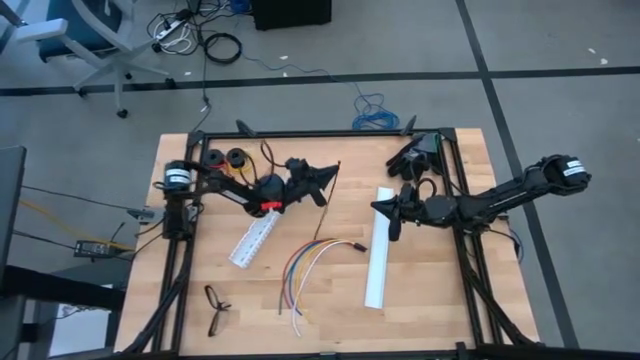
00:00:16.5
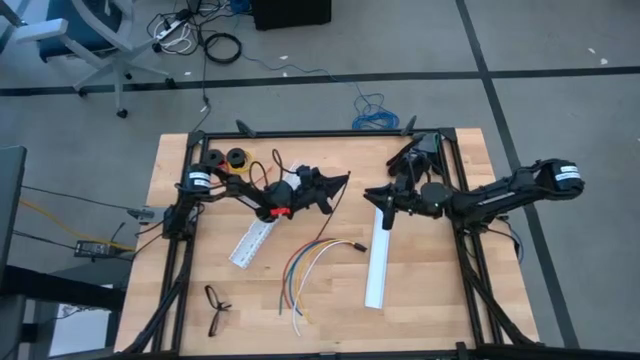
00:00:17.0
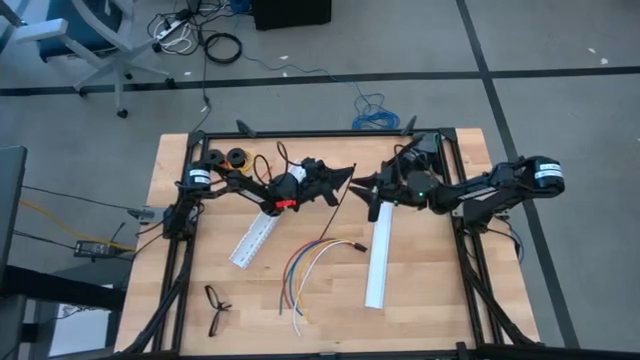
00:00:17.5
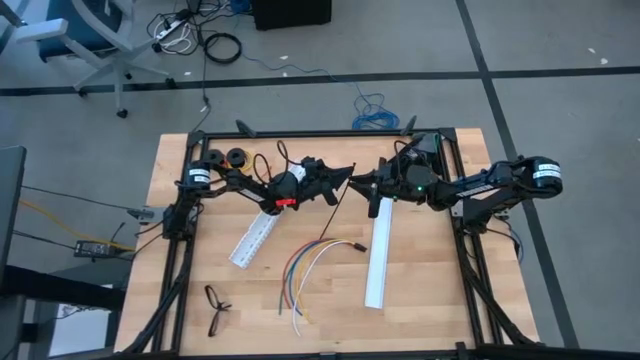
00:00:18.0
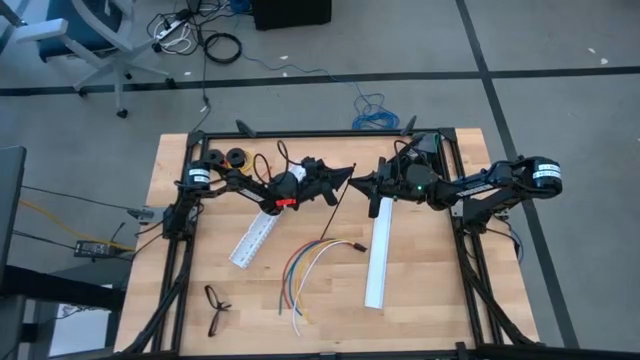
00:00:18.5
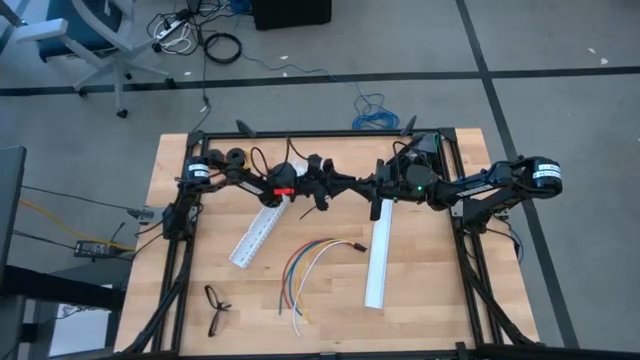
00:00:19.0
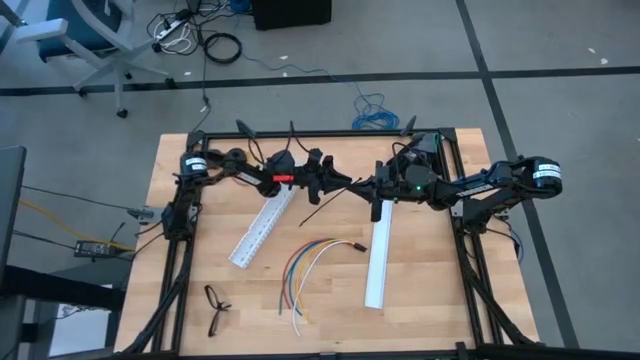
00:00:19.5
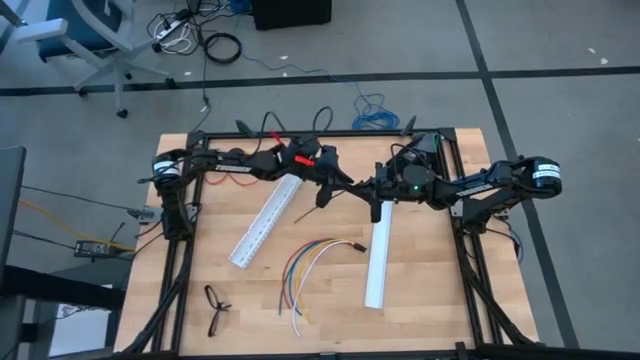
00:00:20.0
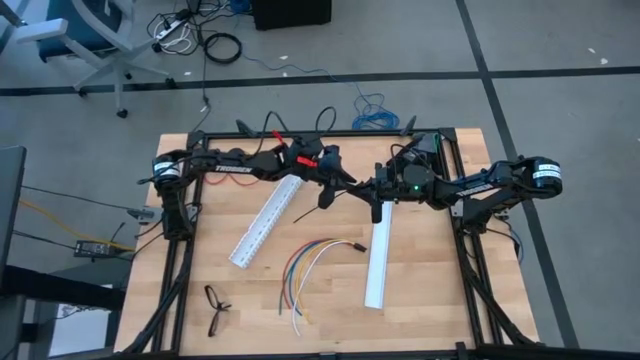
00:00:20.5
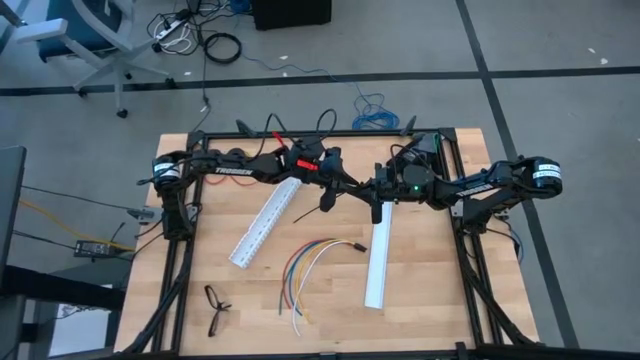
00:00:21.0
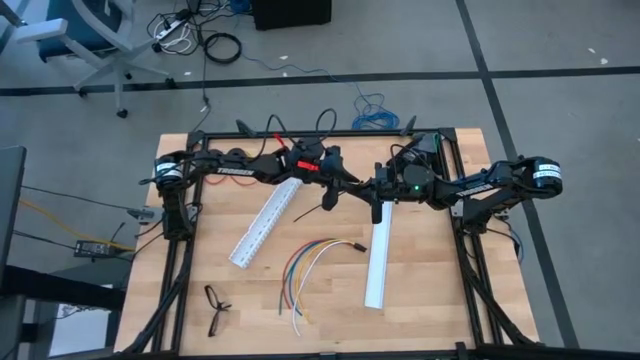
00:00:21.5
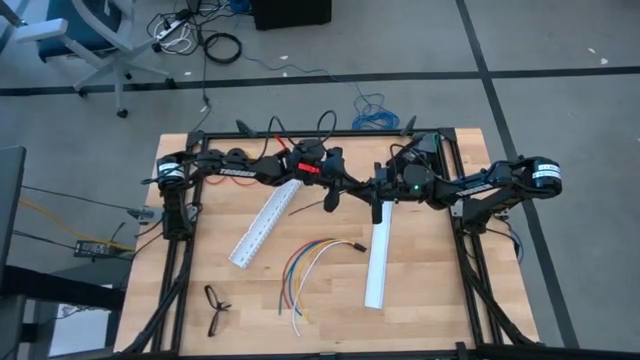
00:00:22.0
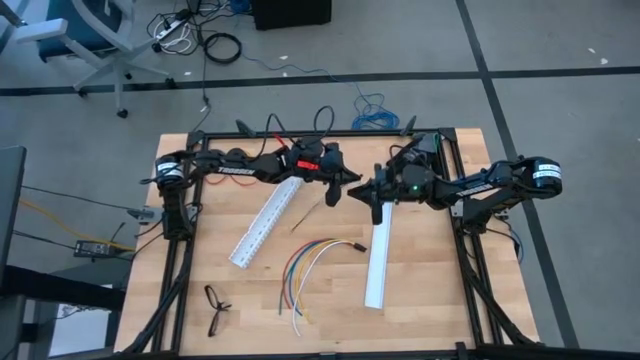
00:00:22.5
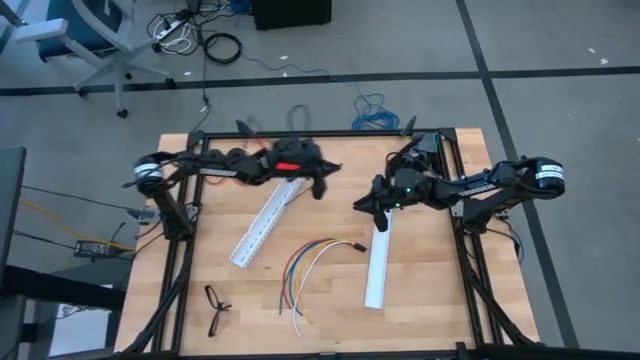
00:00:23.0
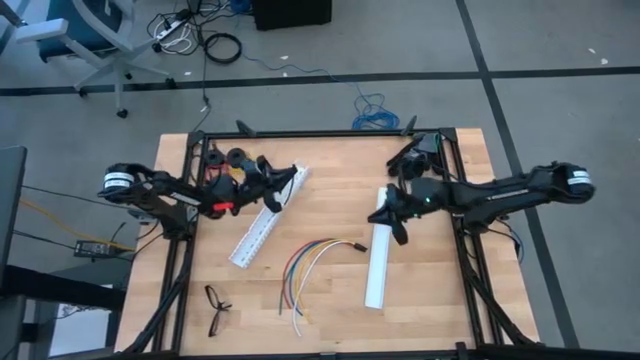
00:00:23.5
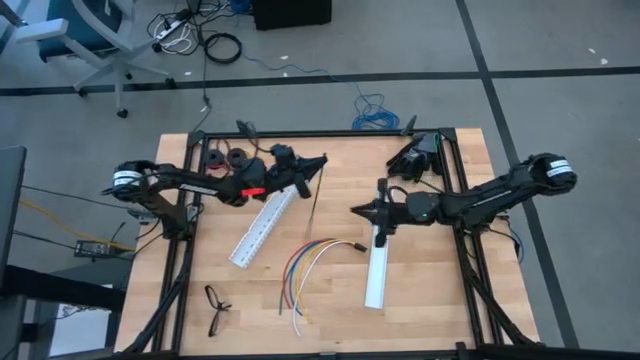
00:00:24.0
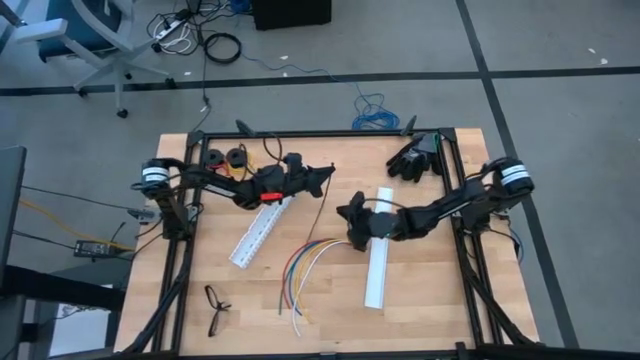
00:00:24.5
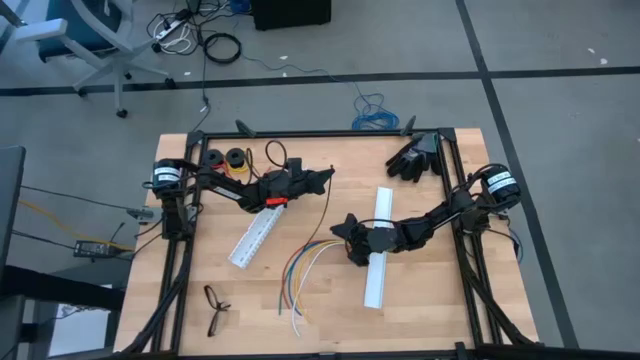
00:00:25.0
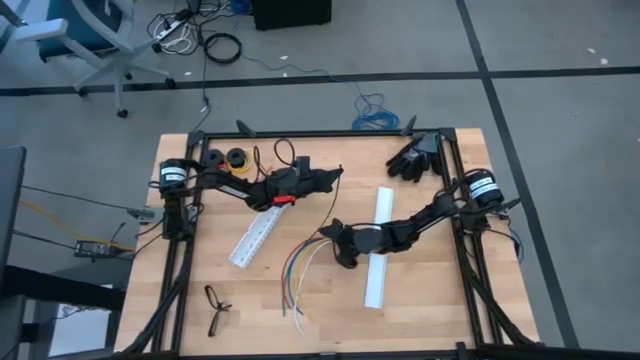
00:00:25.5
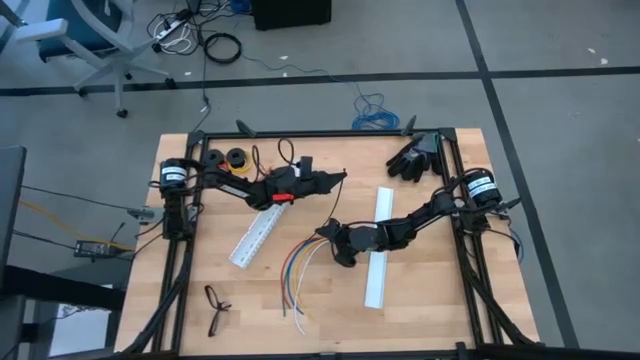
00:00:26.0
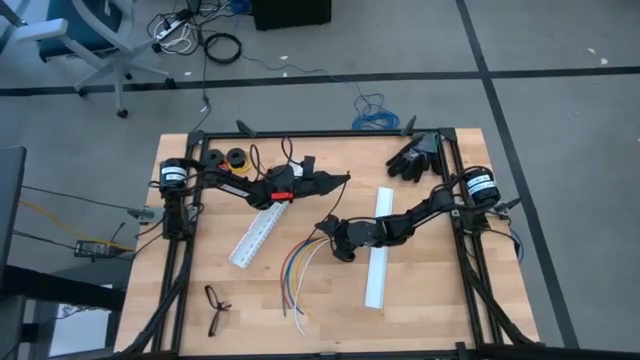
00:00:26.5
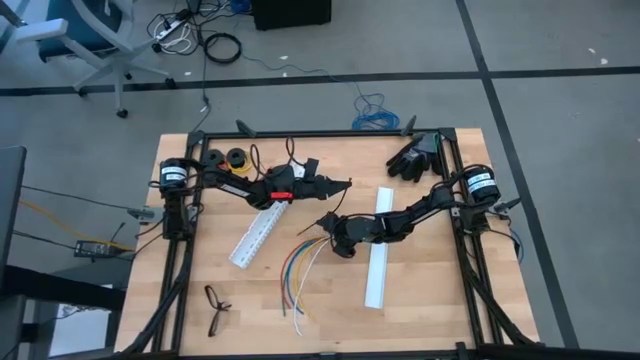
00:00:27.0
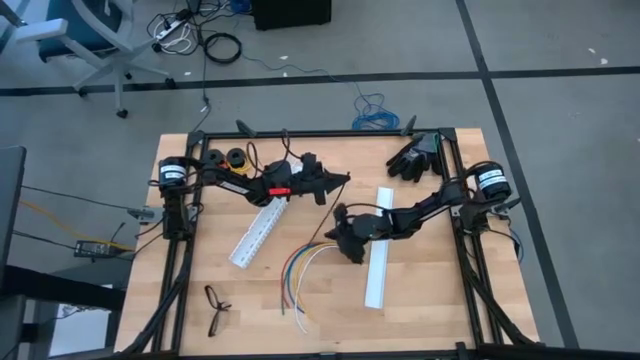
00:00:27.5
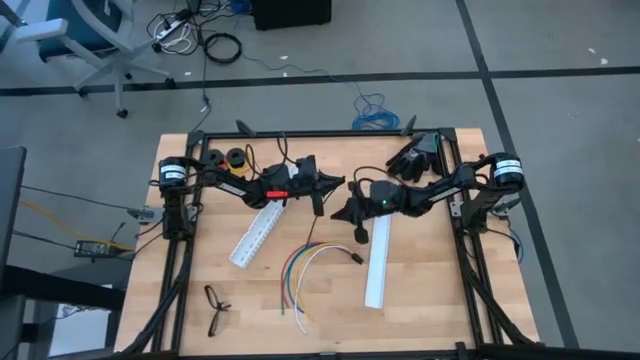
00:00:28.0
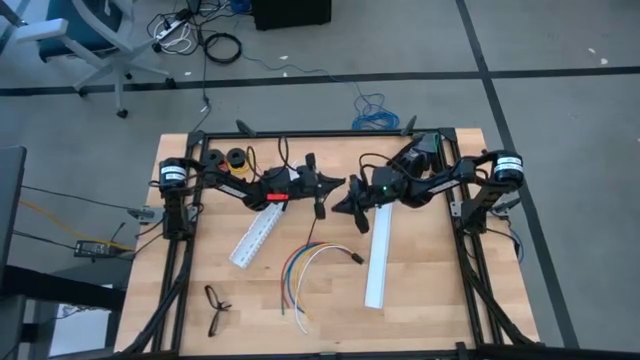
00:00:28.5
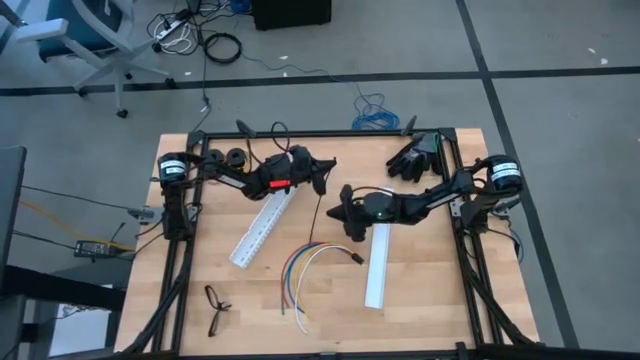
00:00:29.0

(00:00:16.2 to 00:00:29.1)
Task: Ziptie cables
Wrap the cable wires together using the black zip tie

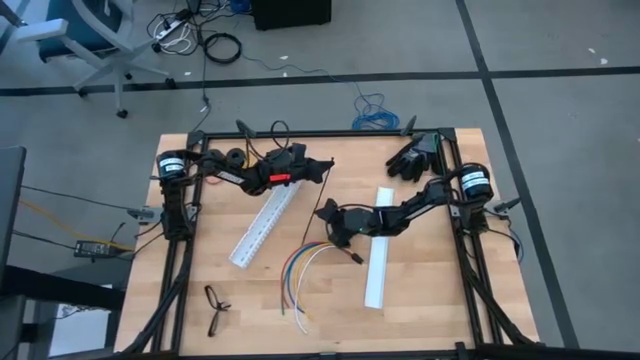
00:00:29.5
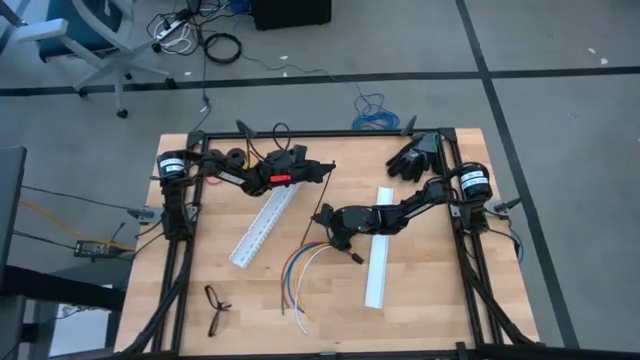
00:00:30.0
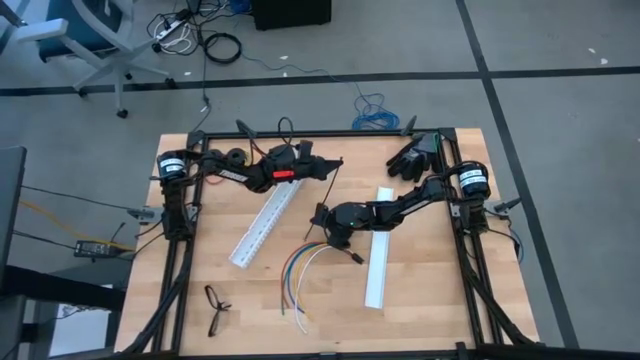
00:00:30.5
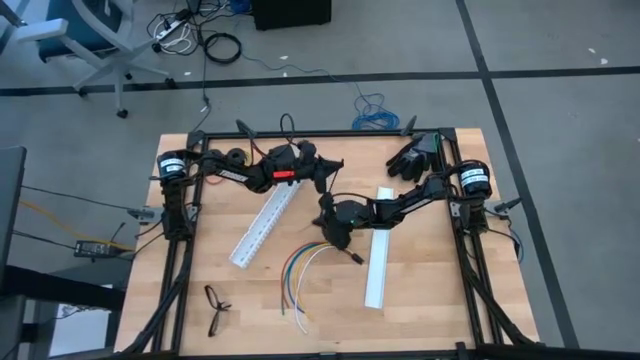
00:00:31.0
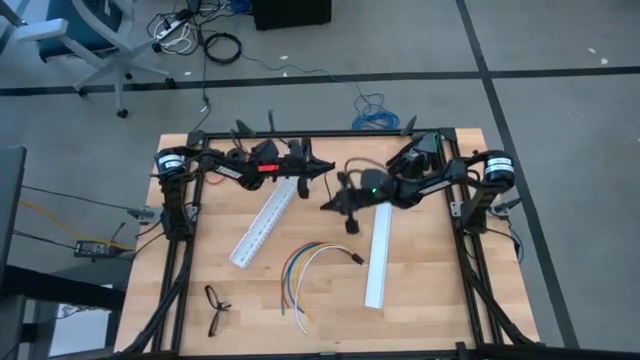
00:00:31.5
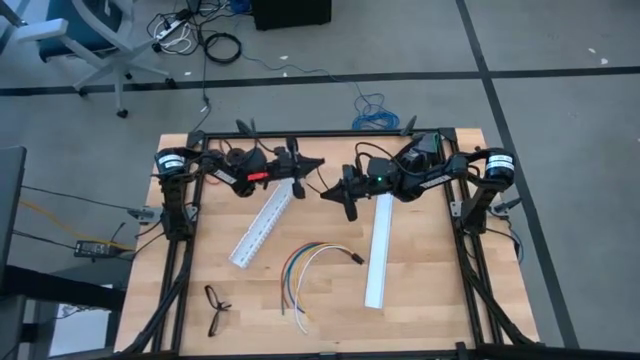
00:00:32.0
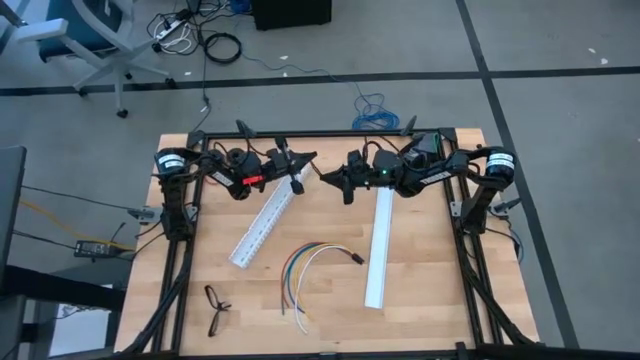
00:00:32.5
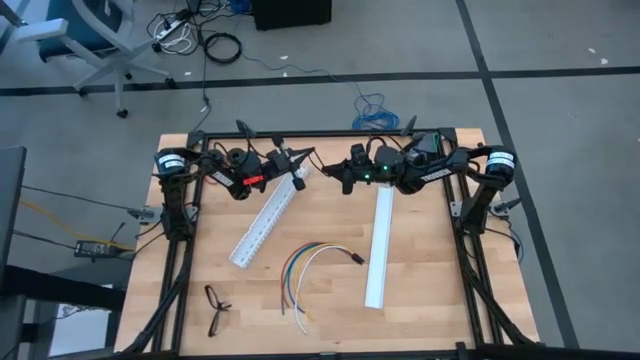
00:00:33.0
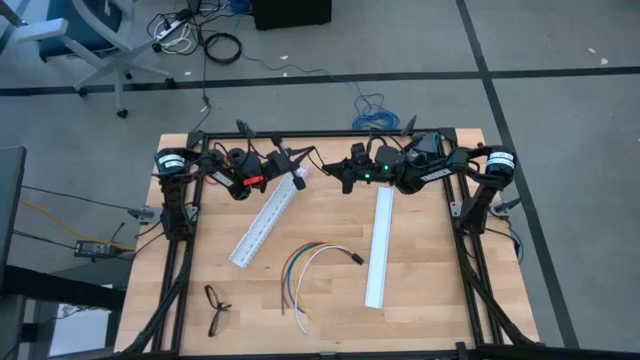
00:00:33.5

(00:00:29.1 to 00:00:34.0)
Wrap the cable wires together using the black zip tie
